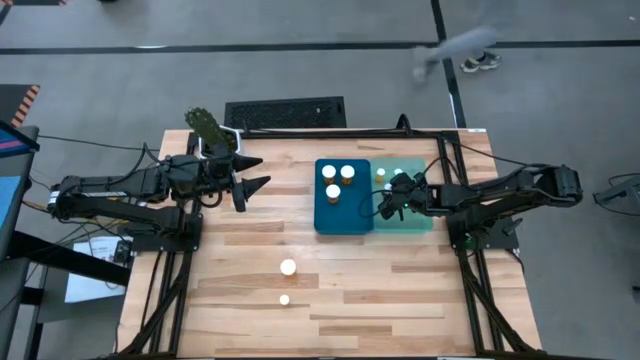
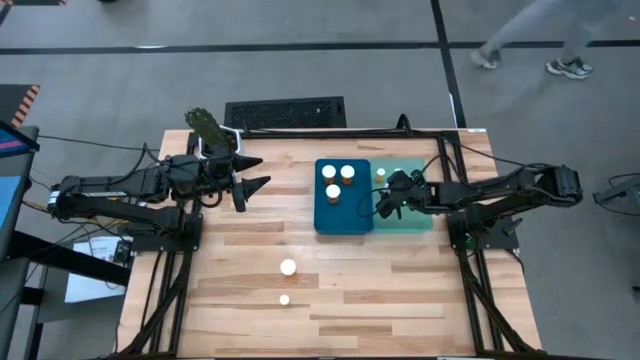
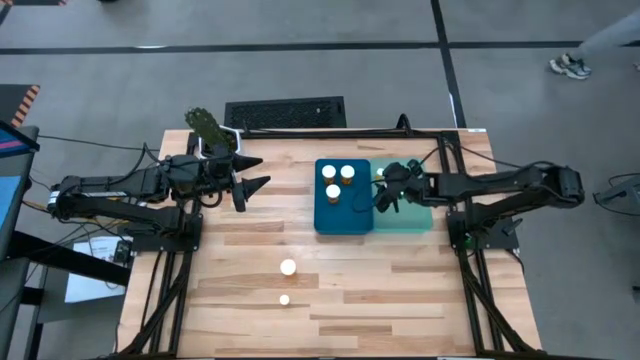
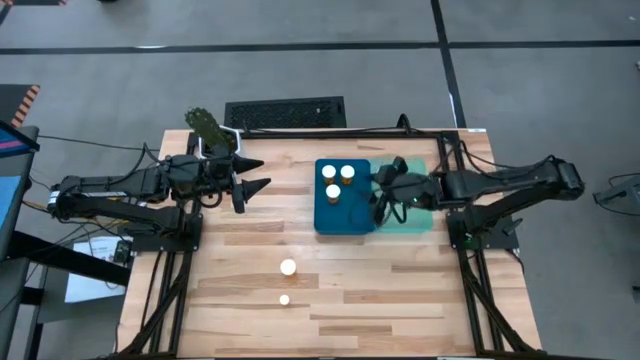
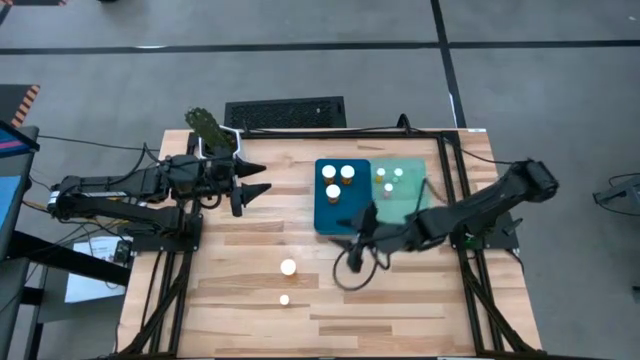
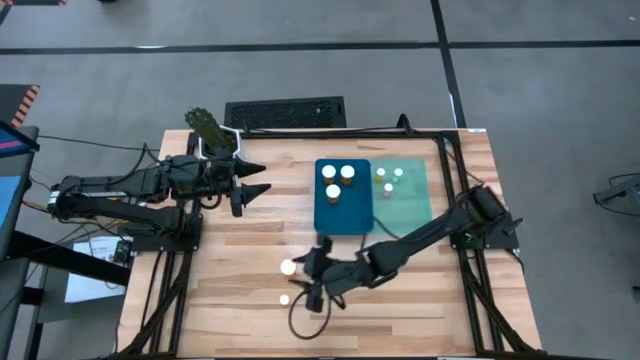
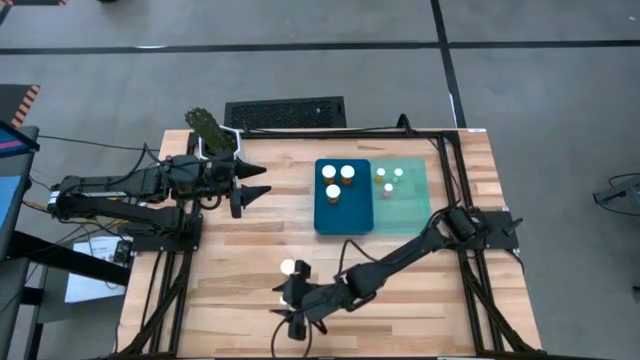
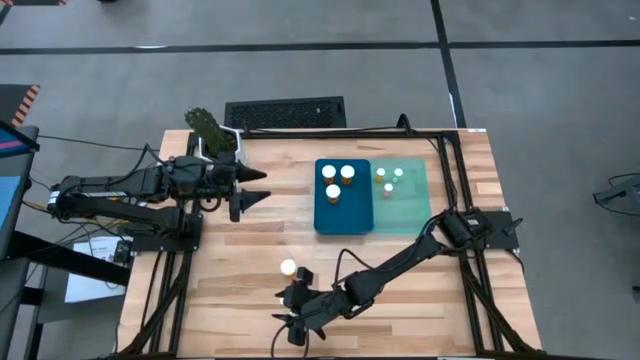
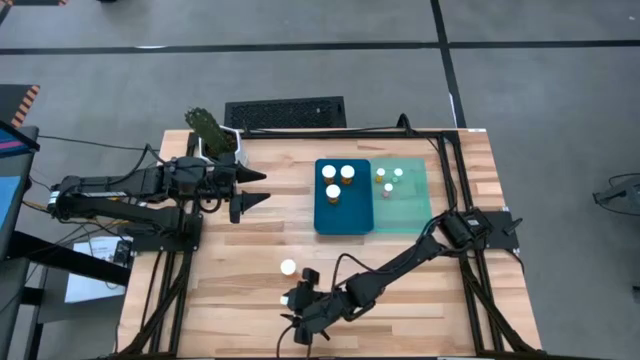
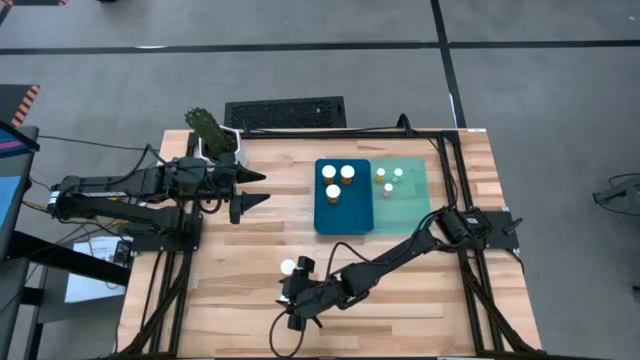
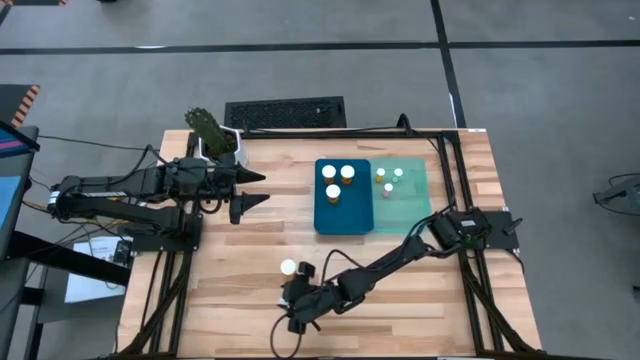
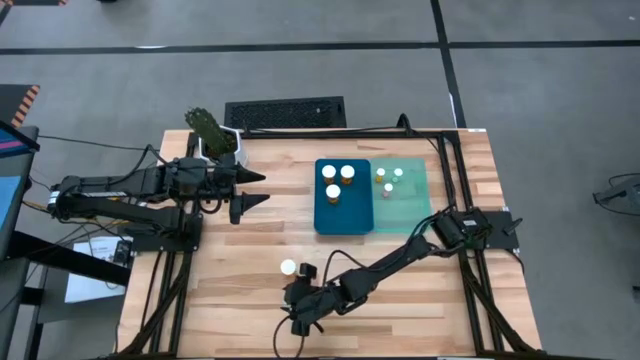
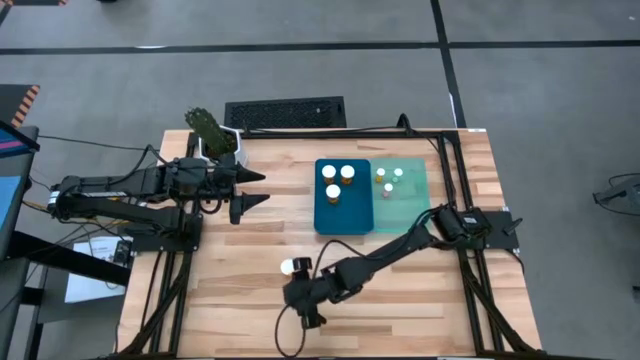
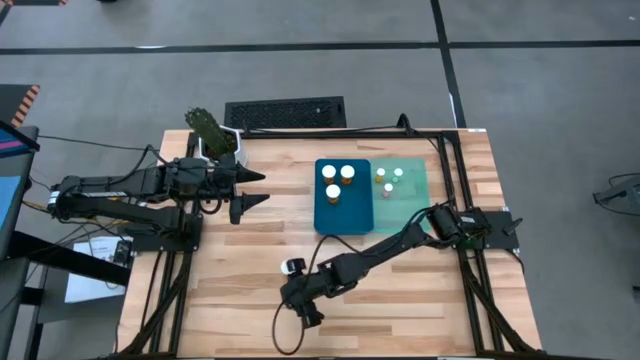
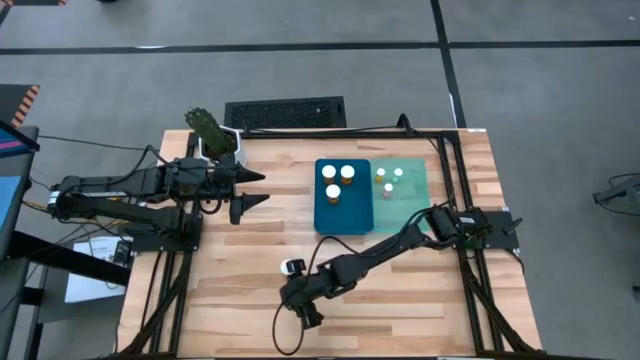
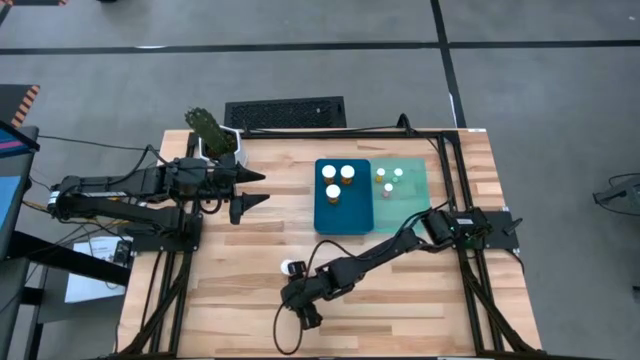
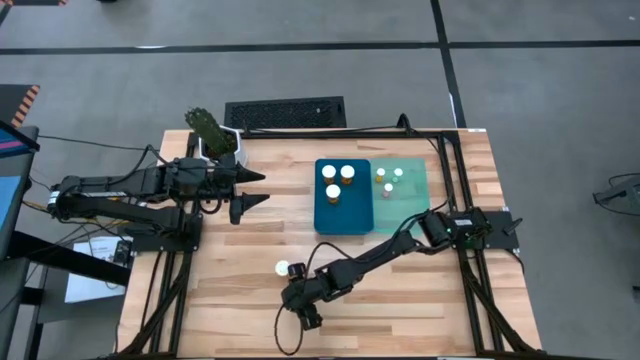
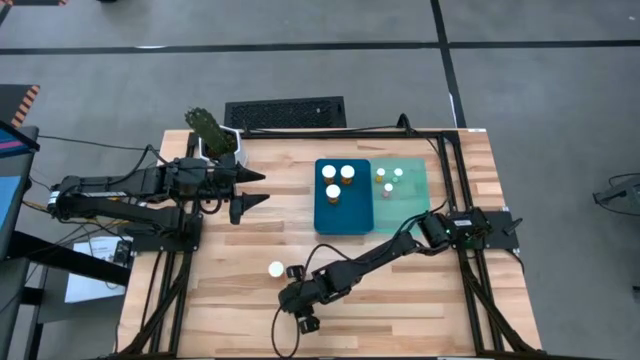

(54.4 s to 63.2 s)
Task: Pick and place medicine bottles into bin by pill shape (circle, oval)
Put the small yellow pill bottle into the green bin

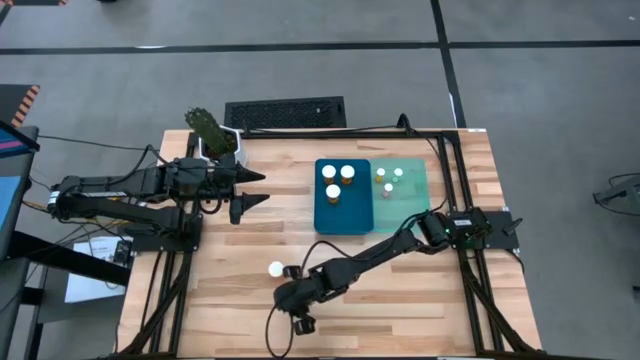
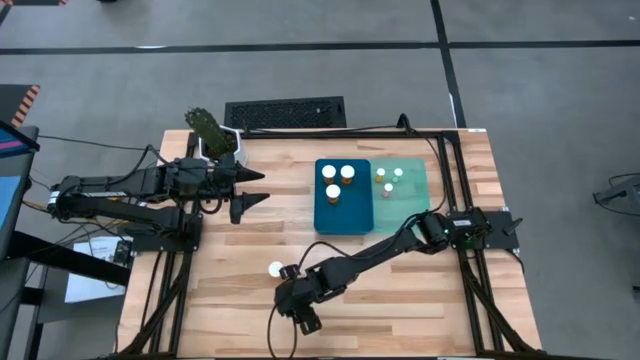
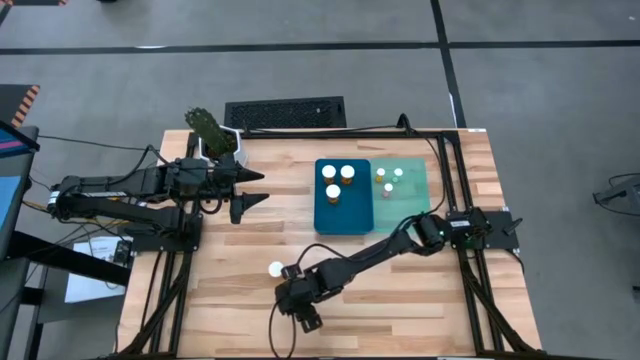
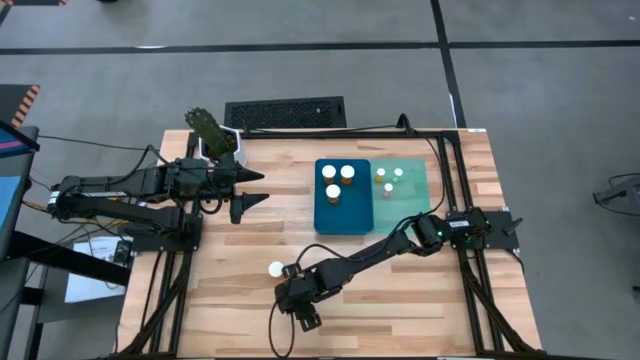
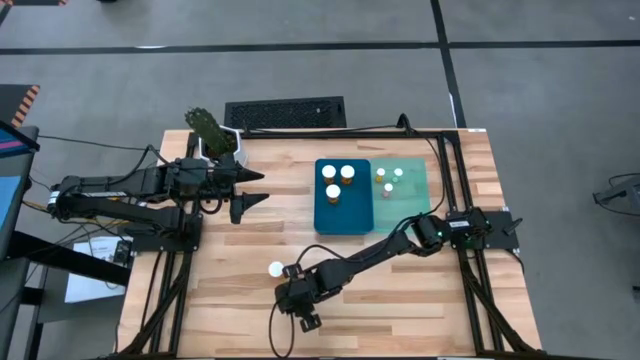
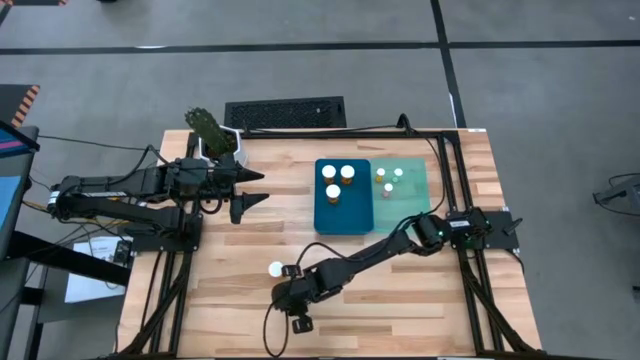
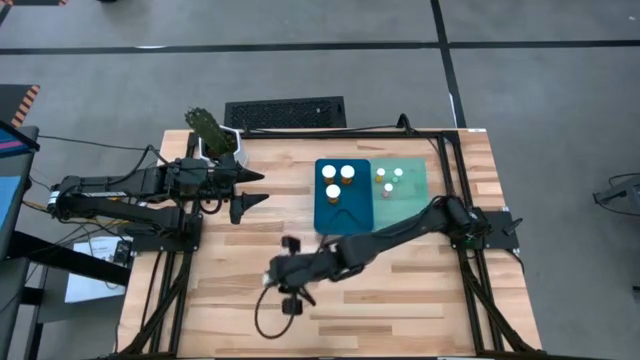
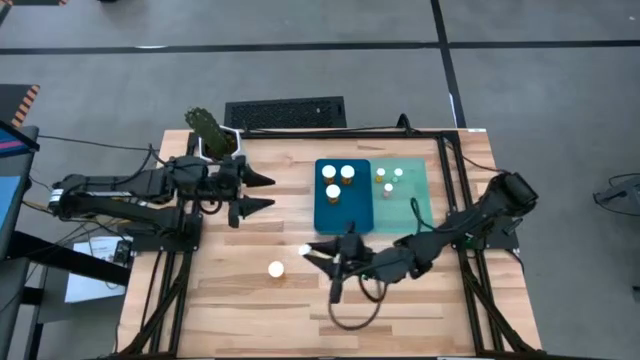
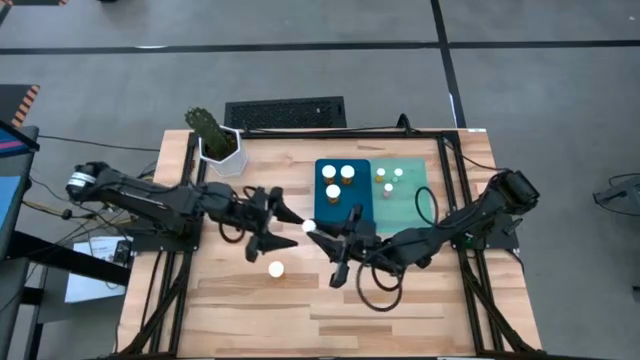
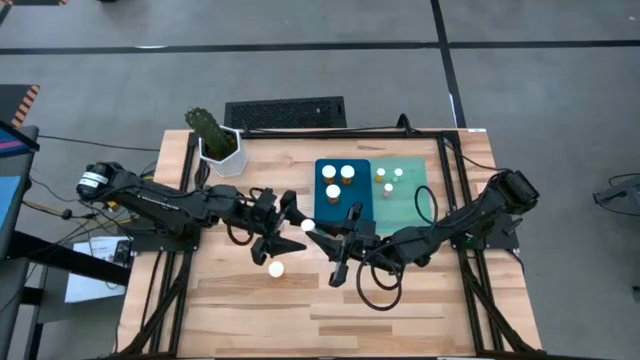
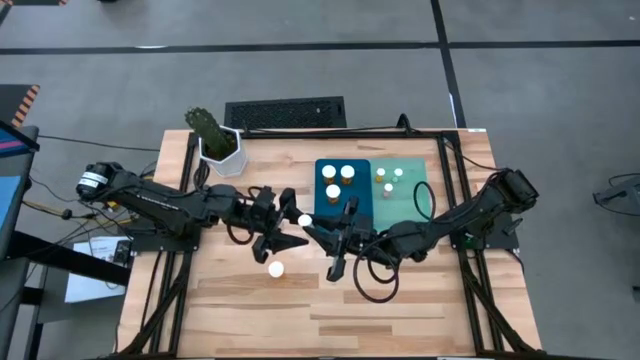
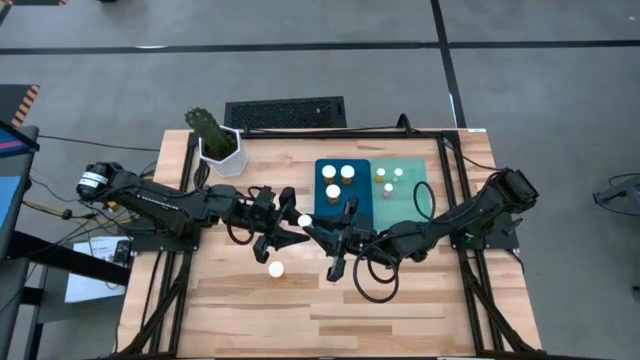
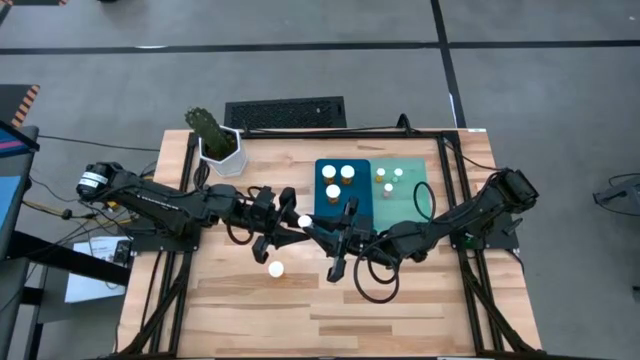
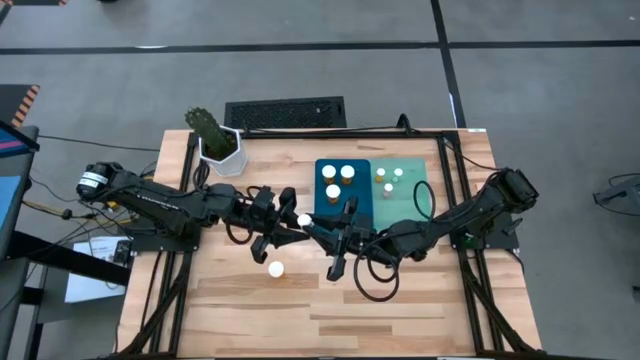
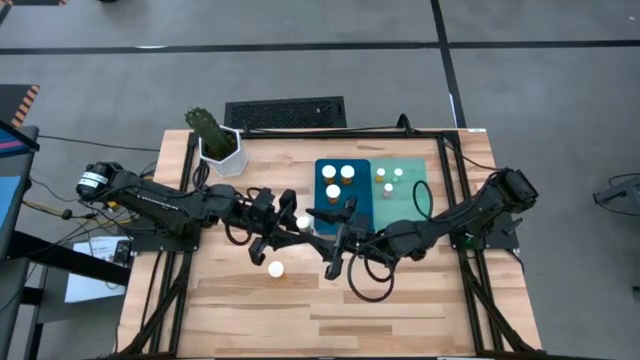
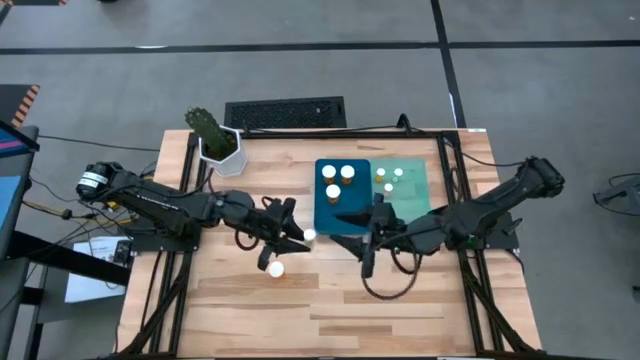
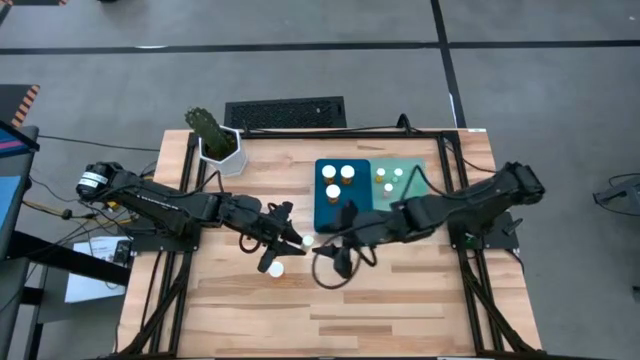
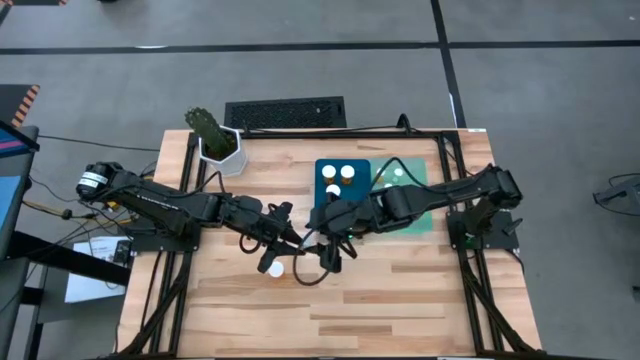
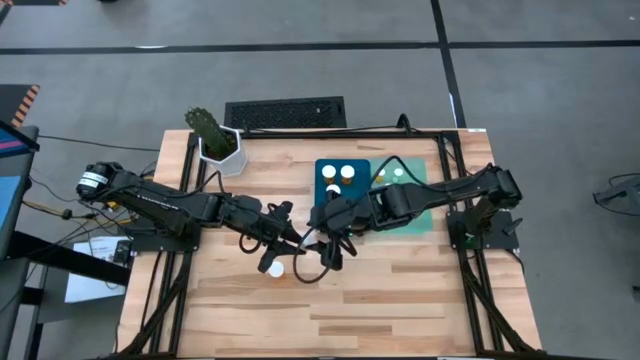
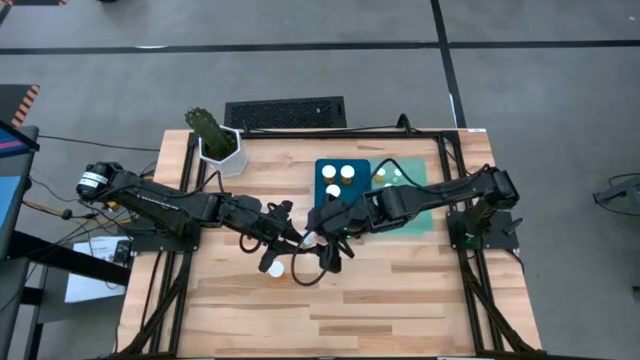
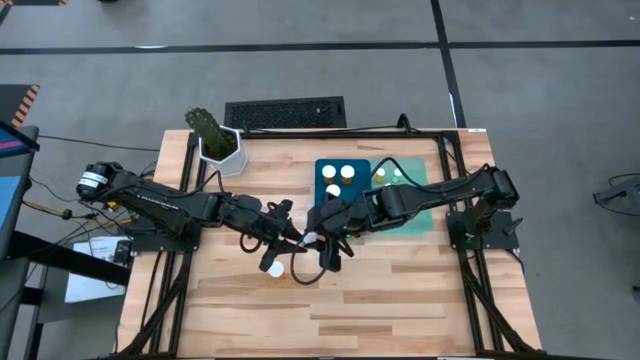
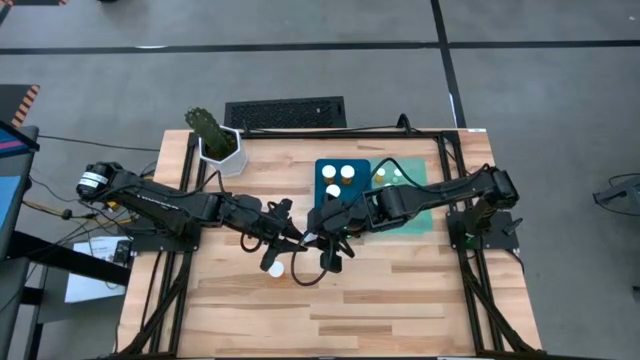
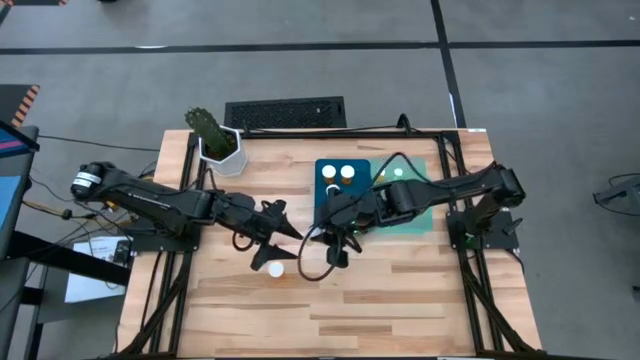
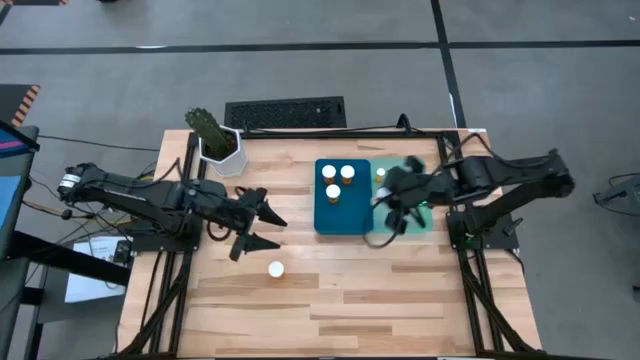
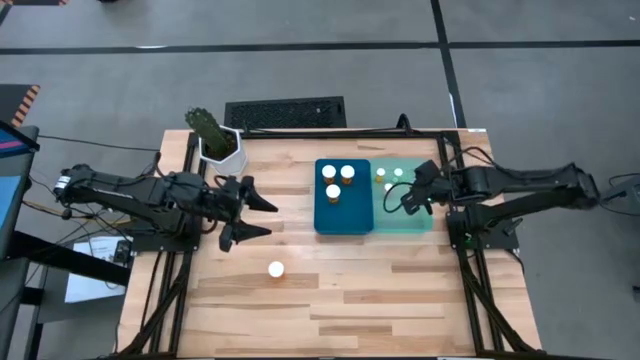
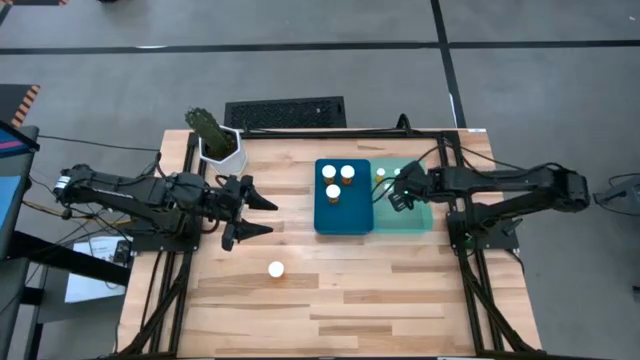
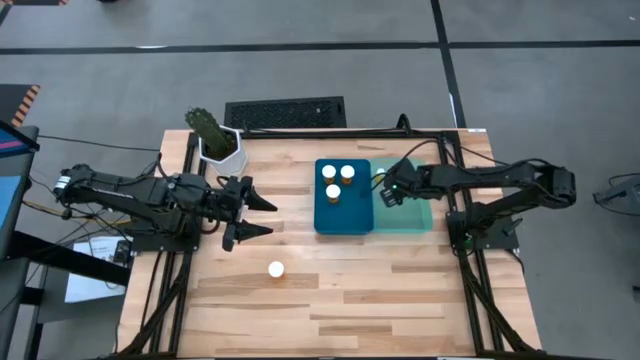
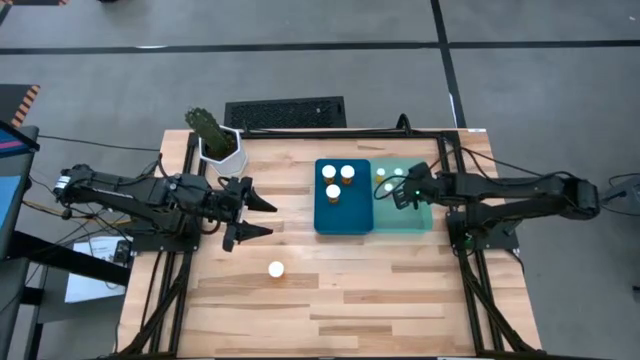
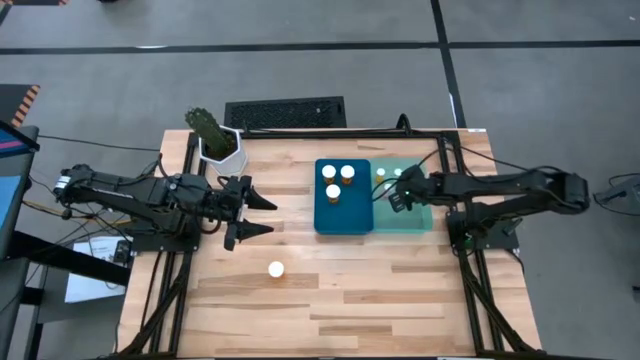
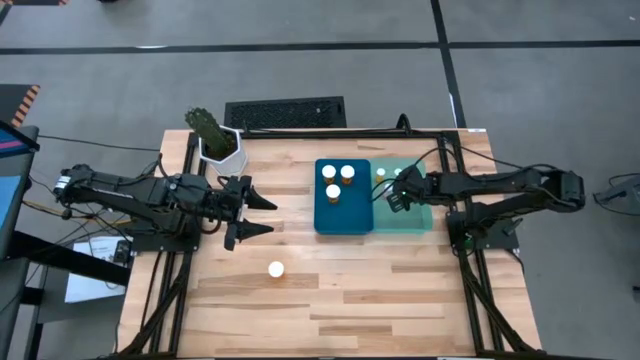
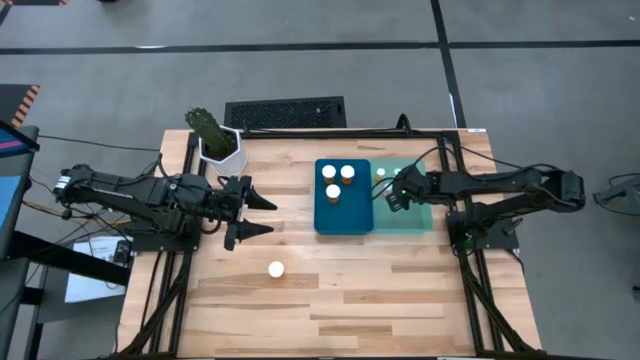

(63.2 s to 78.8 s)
Put the small yellow pill bottle into the green bin
